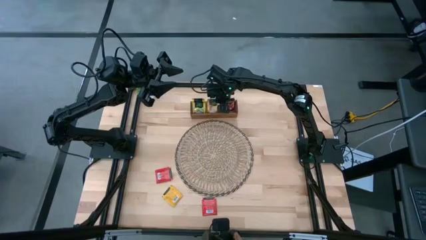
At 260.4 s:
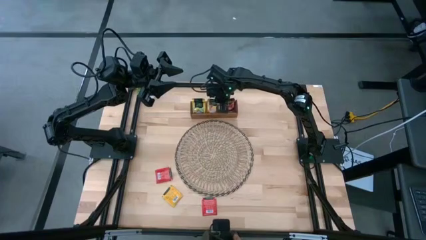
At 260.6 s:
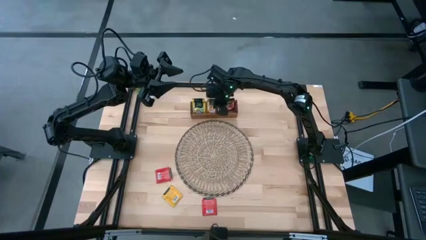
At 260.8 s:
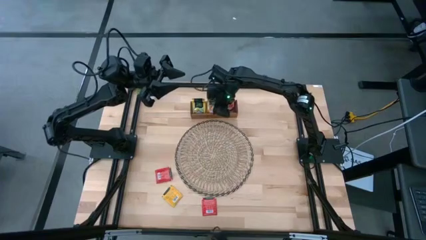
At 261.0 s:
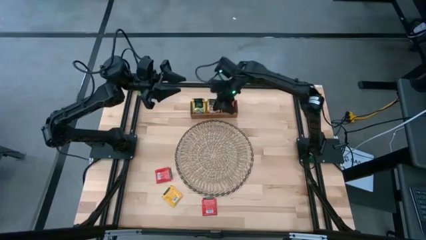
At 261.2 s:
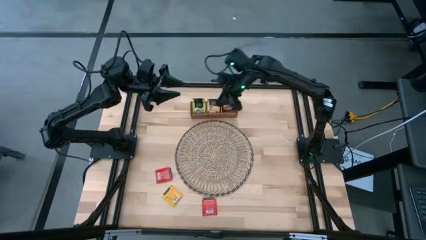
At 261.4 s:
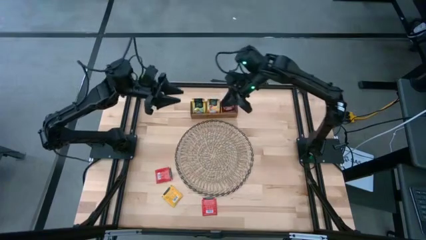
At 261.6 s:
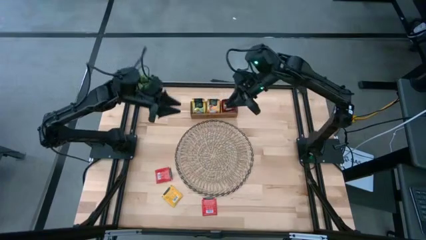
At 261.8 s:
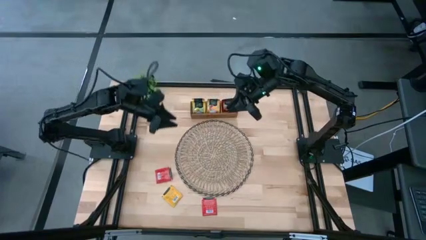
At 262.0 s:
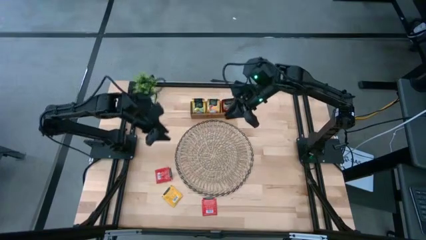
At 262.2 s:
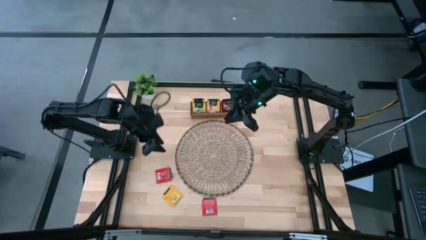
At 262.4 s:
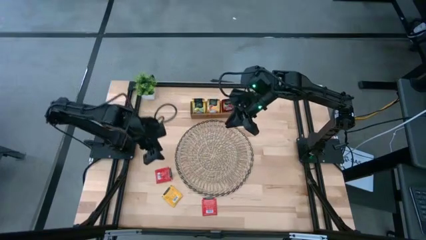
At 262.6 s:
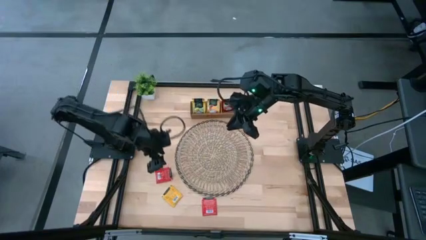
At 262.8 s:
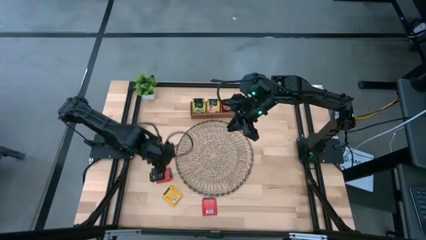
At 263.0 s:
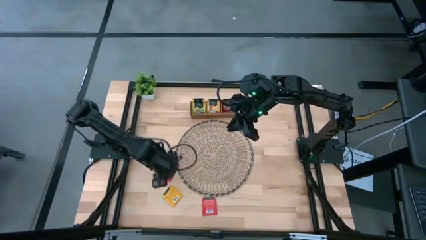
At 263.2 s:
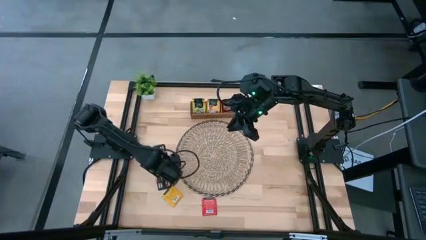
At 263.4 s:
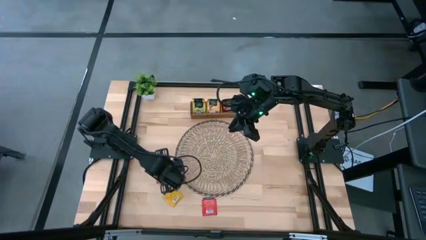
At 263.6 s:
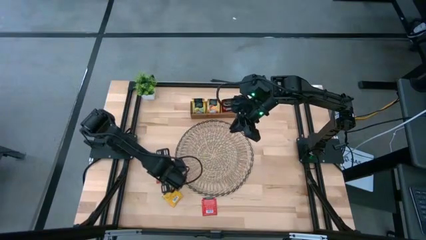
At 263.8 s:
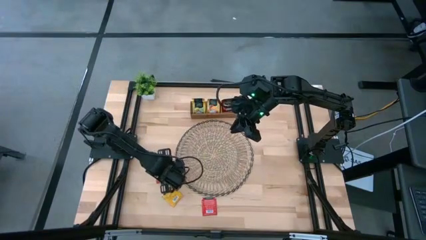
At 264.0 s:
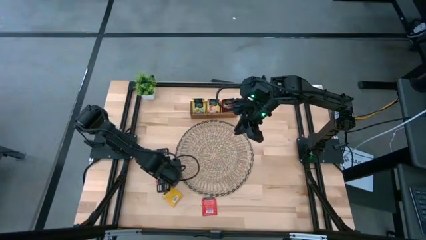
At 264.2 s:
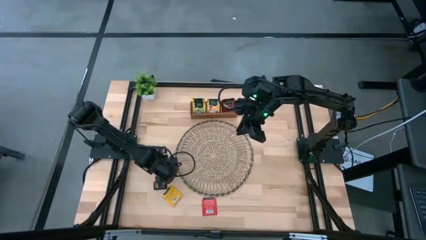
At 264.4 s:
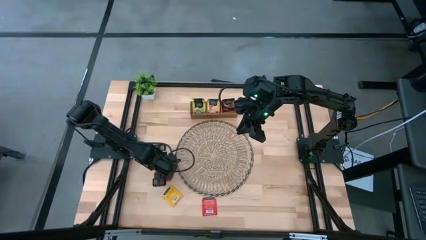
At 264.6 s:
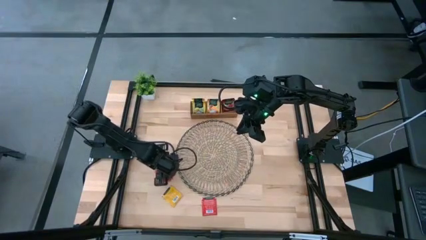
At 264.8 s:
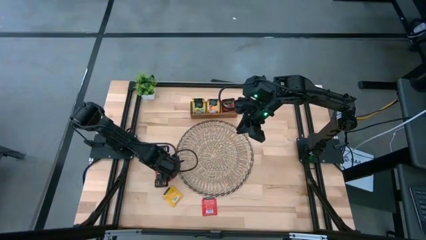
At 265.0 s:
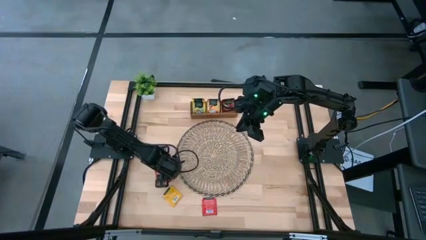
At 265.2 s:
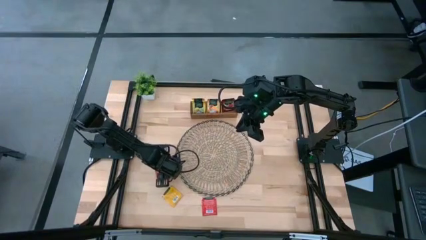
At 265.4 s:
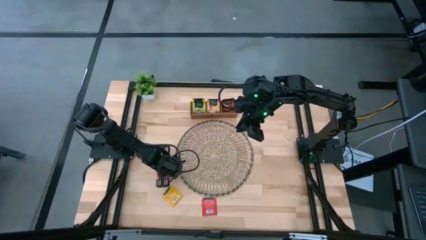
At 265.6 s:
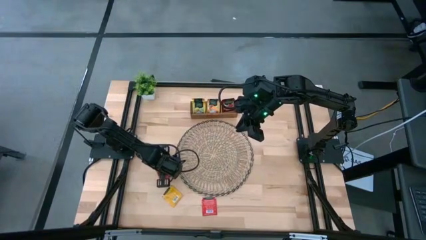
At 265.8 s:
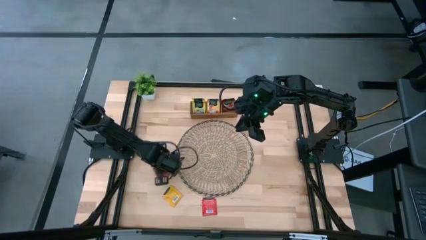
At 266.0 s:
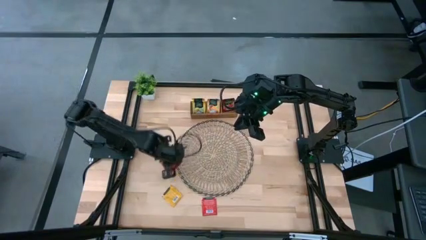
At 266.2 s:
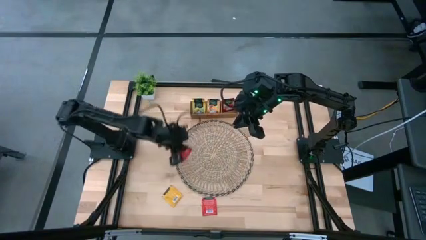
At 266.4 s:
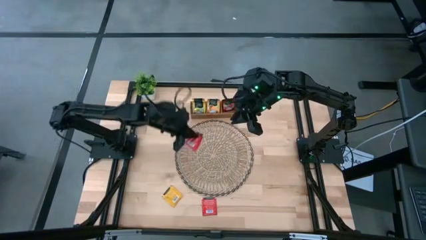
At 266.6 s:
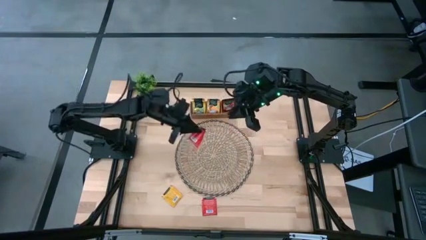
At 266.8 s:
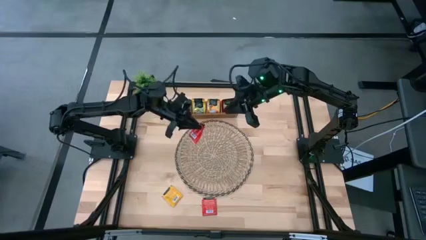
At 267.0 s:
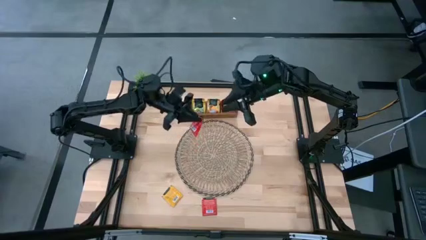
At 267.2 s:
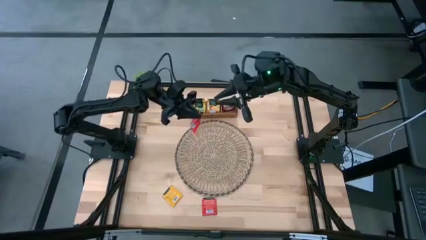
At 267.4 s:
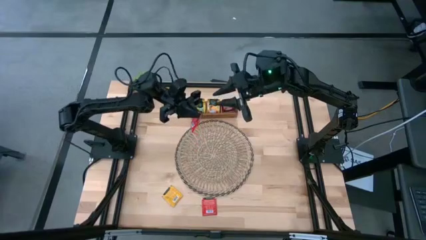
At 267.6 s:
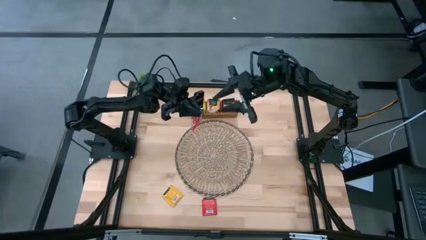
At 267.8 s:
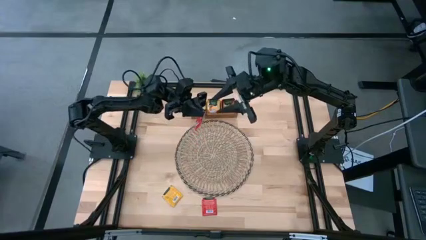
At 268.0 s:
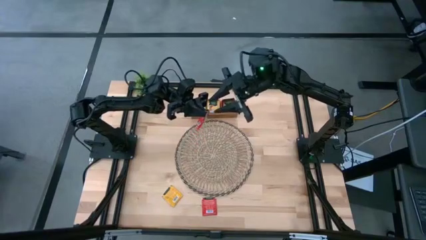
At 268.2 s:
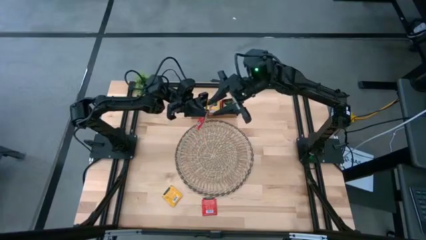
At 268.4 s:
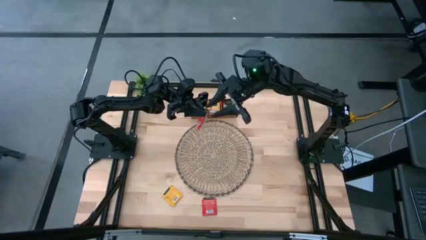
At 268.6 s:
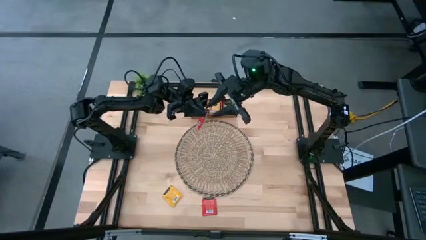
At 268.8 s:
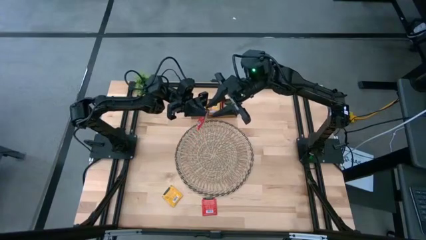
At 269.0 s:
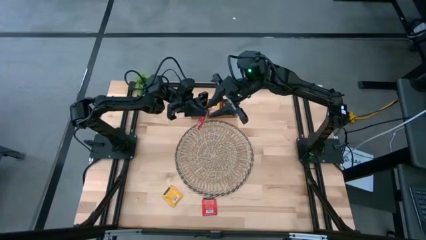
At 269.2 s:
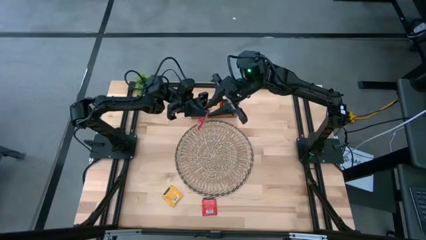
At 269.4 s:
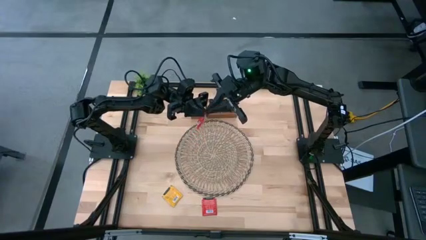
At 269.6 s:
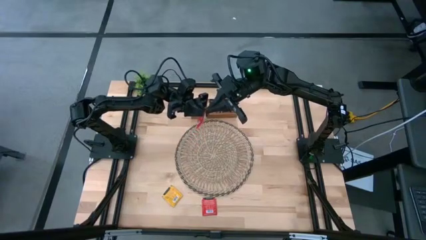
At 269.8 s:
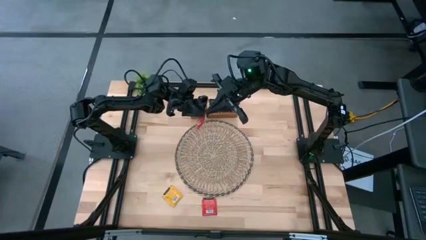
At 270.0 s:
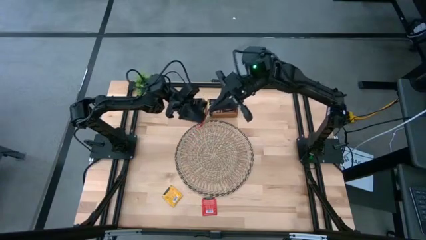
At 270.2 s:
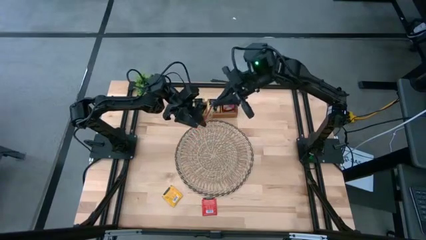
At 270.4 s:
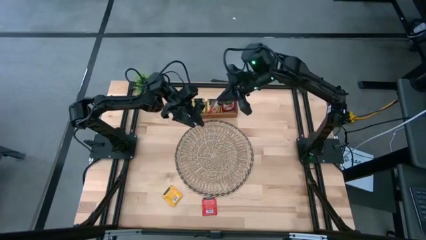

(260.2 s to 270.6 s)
Task: Pick & Place Tea
Put the top red tea bag into the right of the wooden organizer
